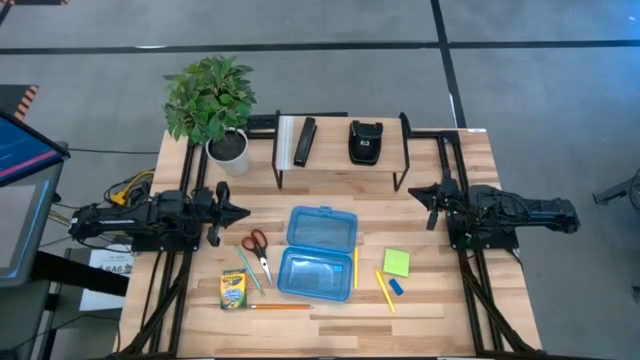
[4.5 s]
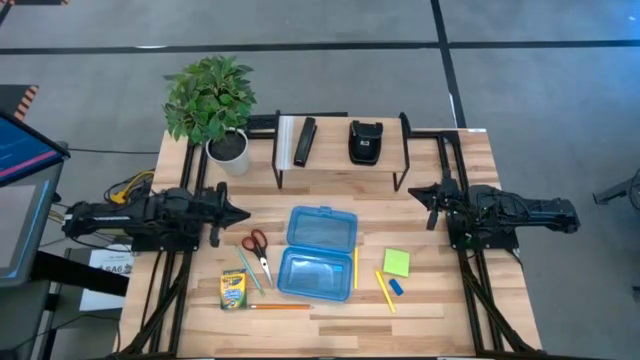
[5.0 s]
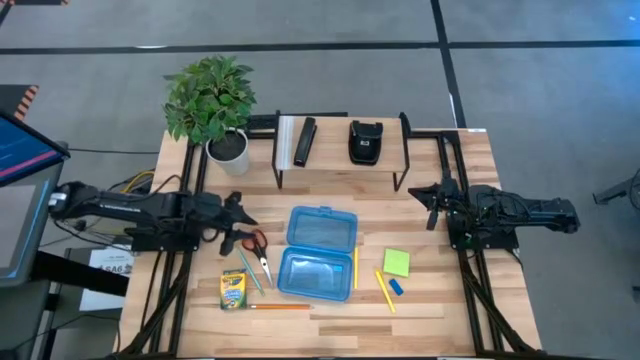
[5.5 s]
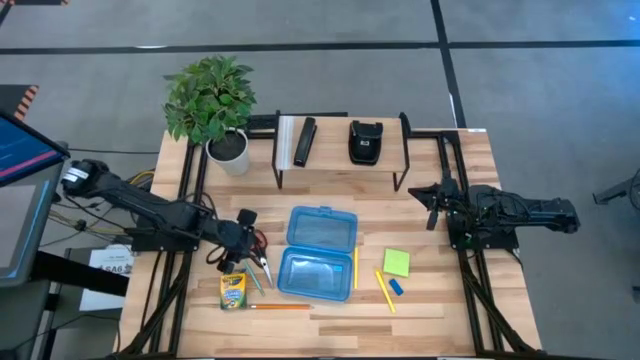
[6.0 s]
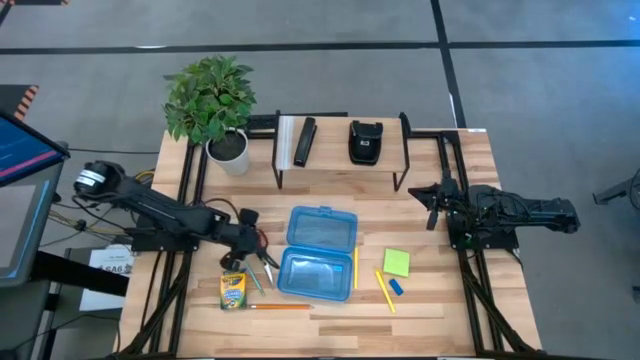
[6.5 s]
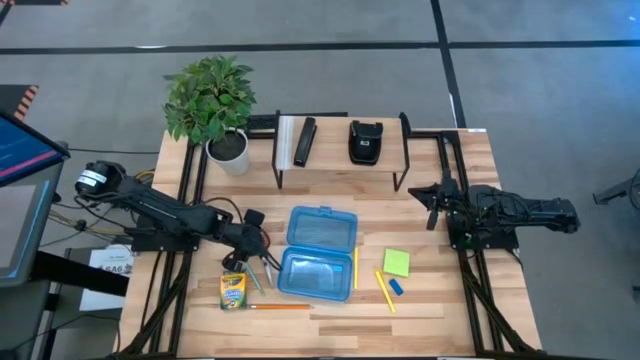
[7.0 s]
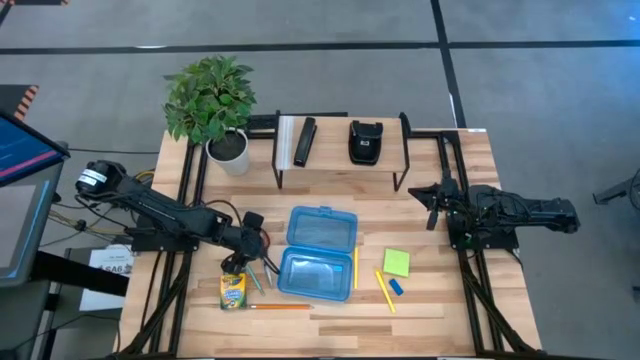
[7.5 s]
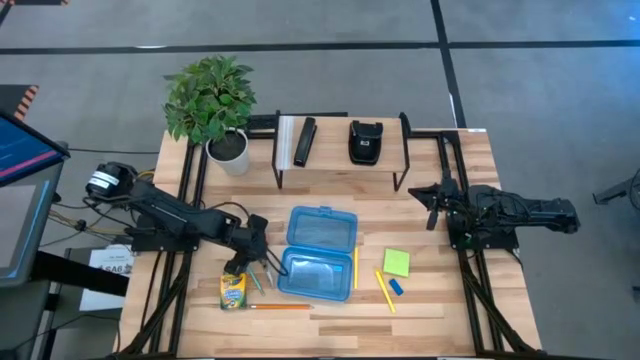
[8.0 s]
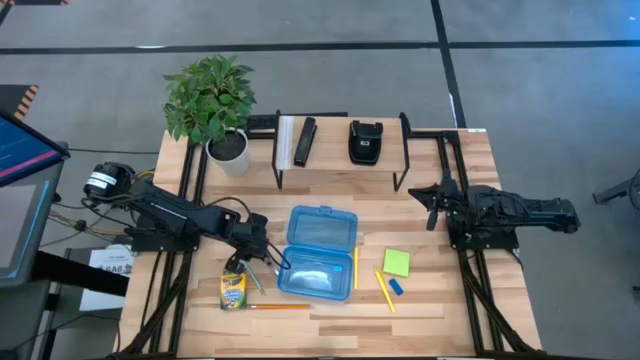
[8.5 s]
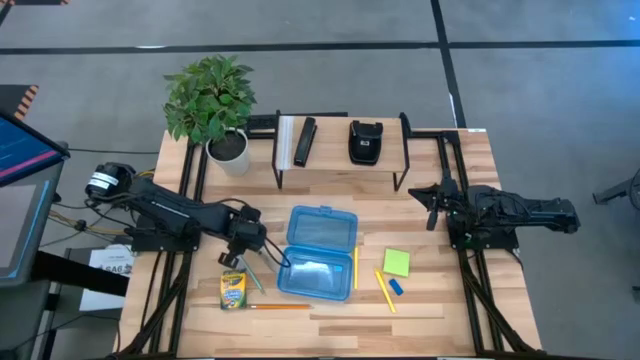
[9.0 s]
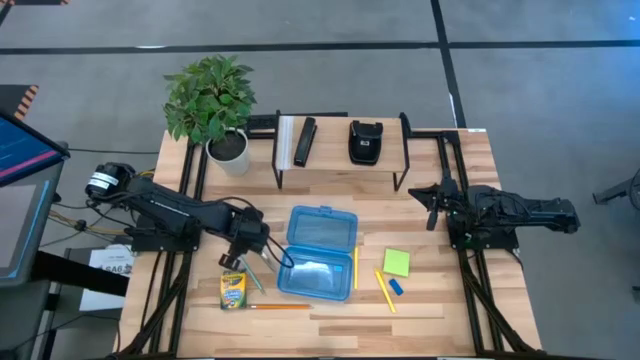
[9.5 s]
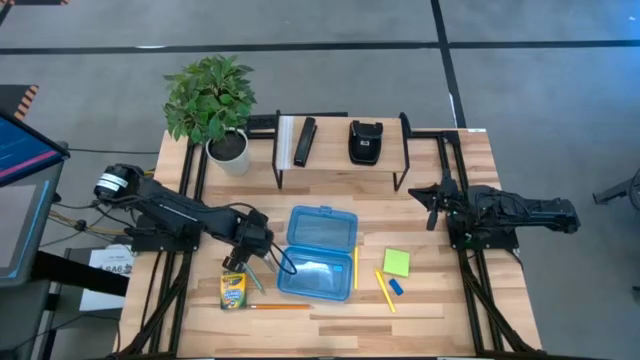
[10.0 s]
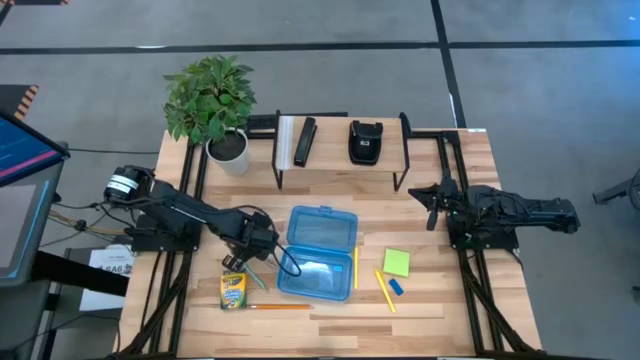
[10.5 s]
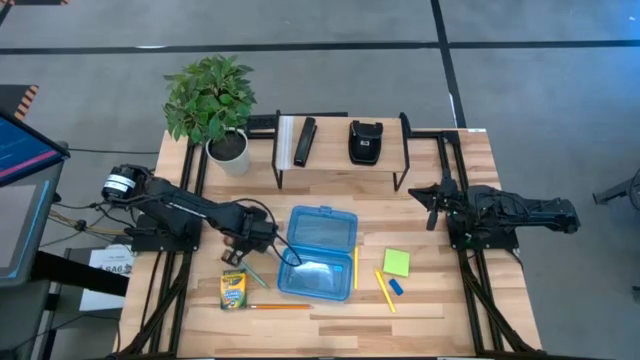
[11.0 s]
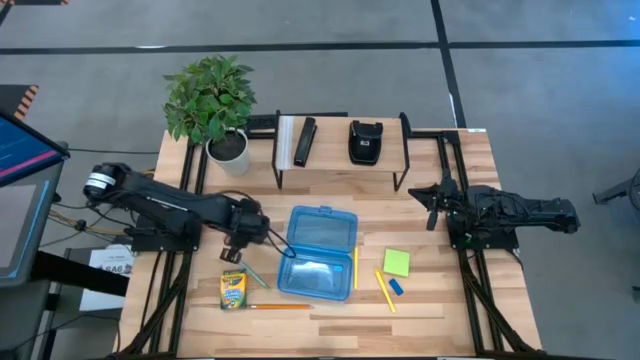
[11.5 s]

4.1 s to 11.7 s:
Task: Pack school essentials
Put the red scissors into the supply box

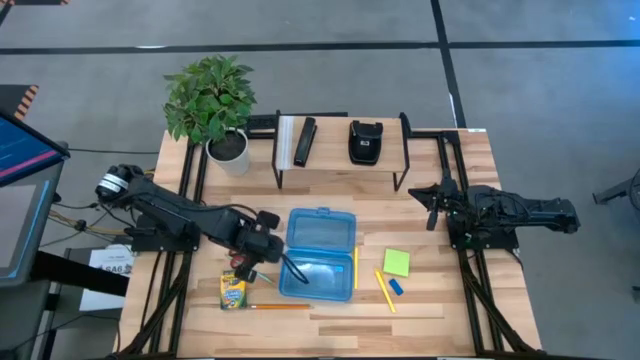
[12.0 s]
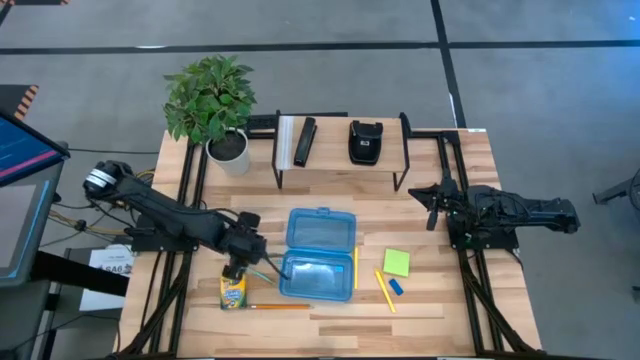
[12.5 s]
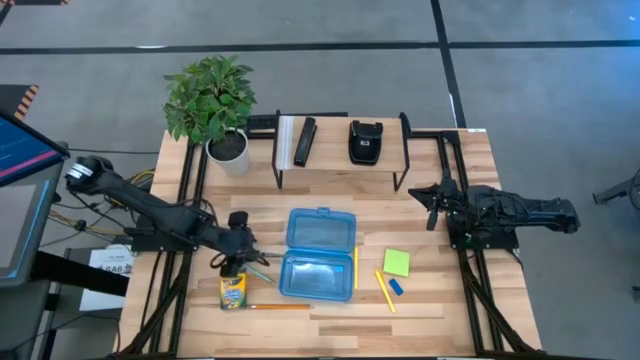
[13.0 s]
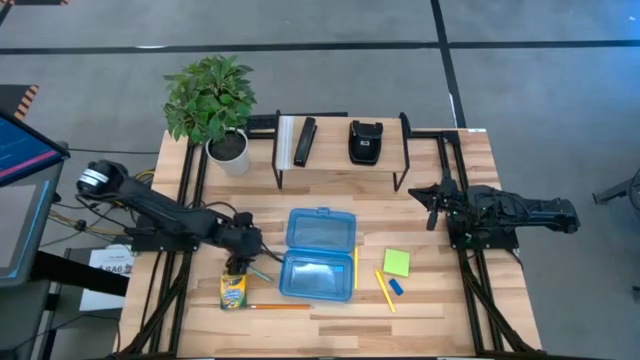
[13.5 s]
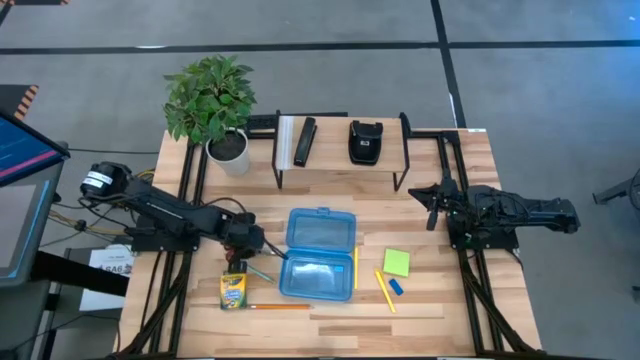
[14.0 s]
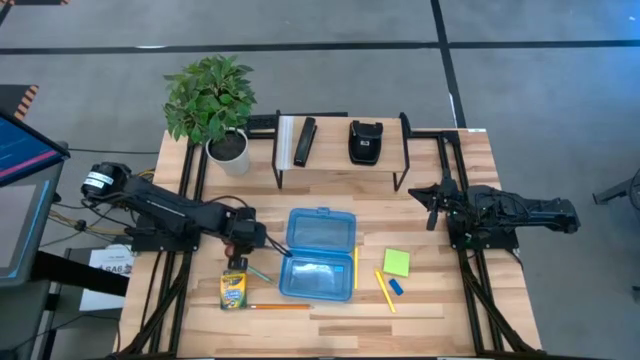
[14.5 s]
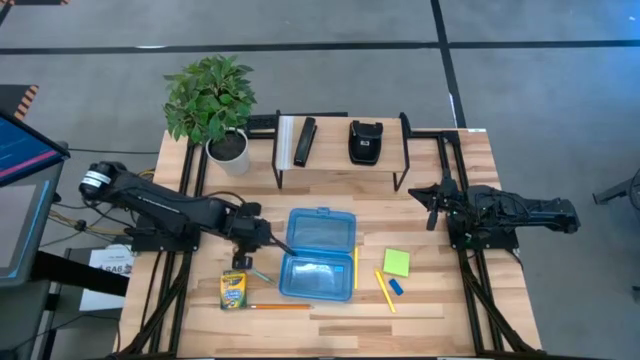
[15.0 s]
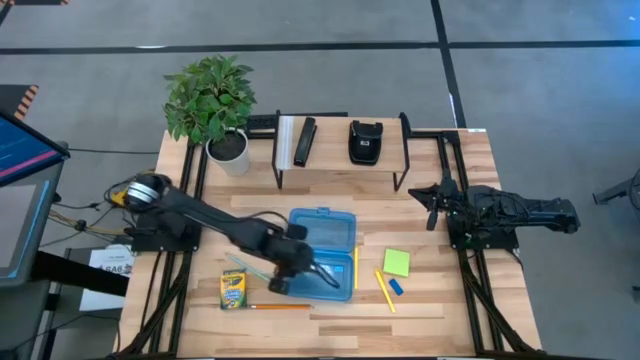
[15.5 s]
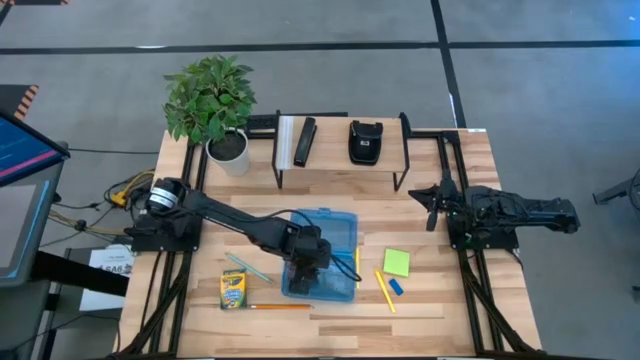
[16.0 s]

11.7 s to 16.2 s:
Put the red scissors into the supply box

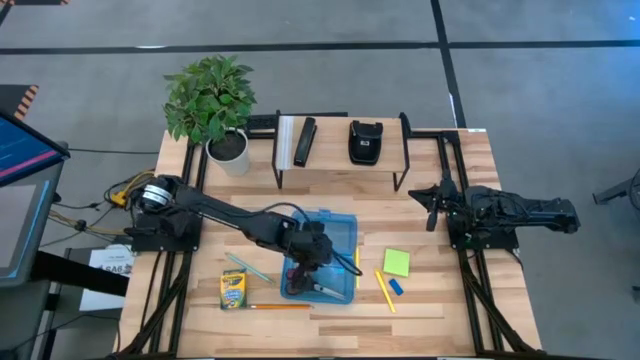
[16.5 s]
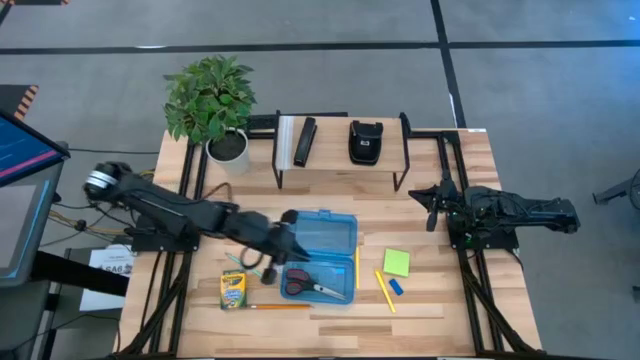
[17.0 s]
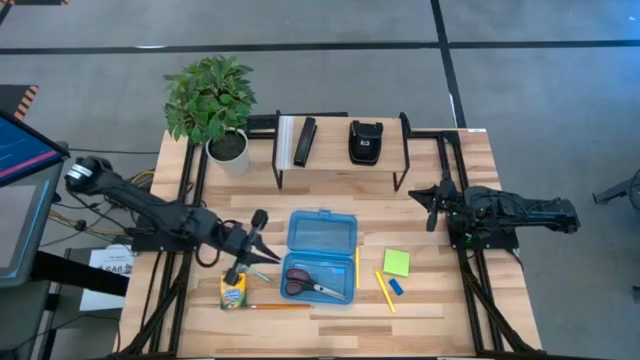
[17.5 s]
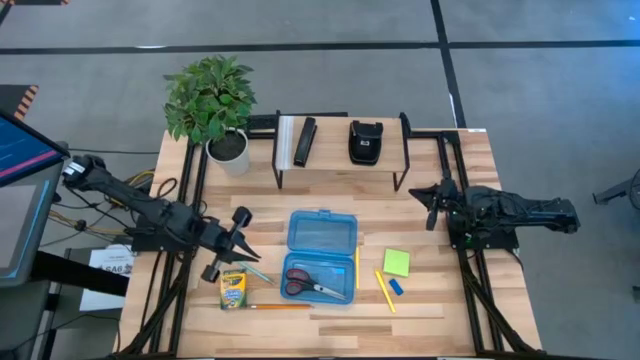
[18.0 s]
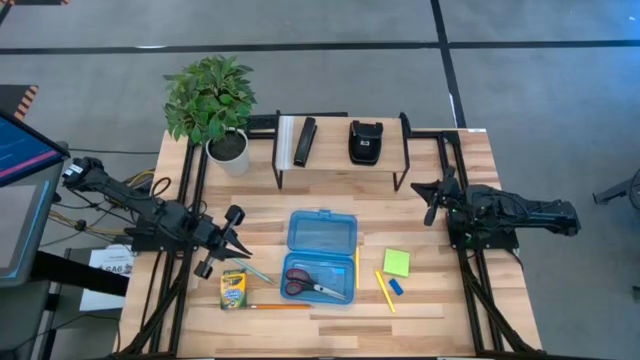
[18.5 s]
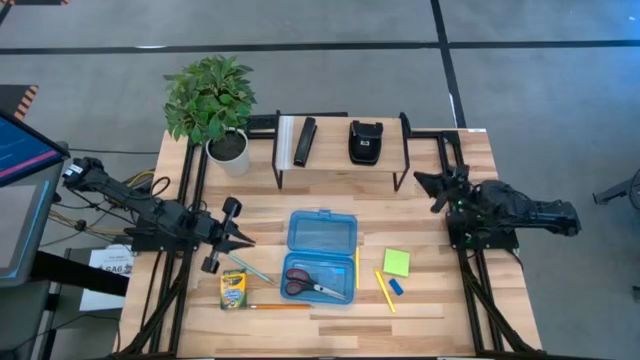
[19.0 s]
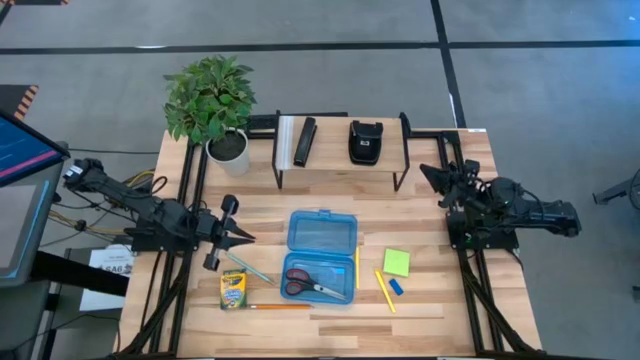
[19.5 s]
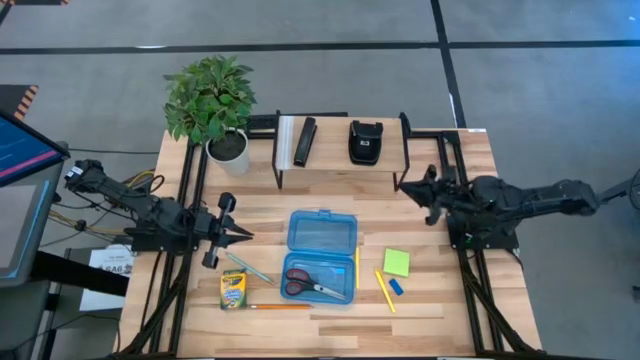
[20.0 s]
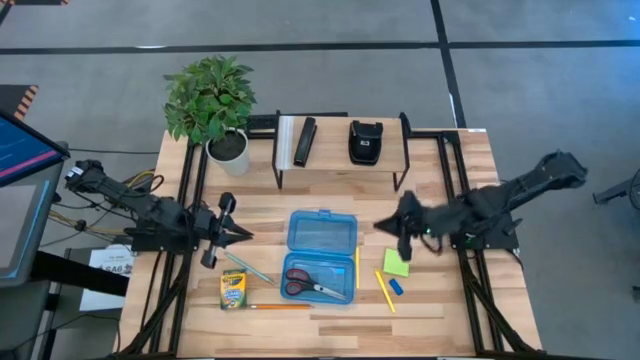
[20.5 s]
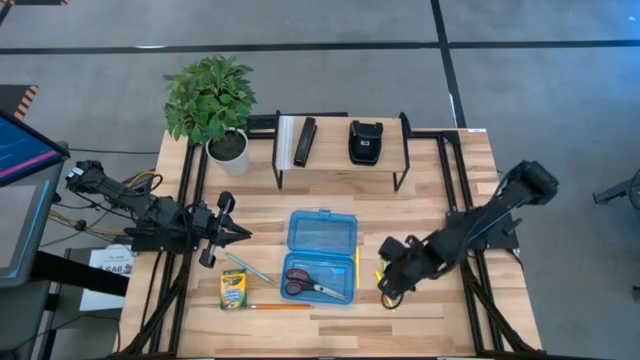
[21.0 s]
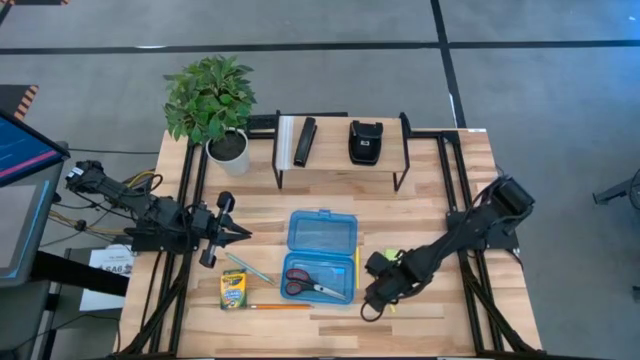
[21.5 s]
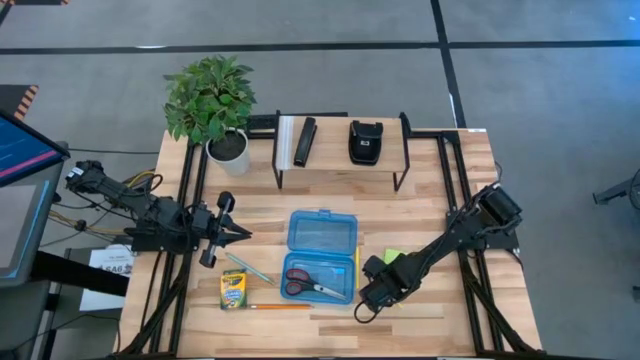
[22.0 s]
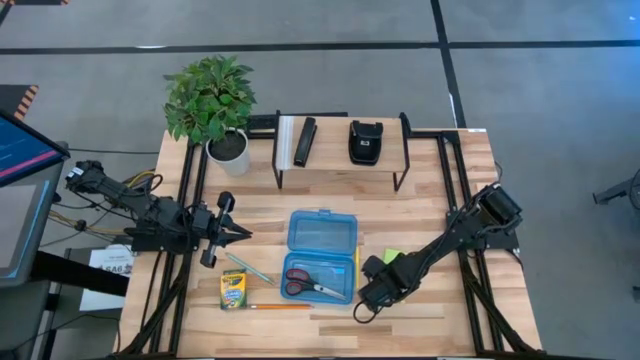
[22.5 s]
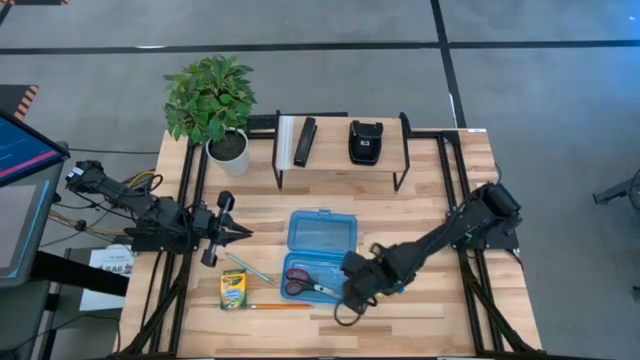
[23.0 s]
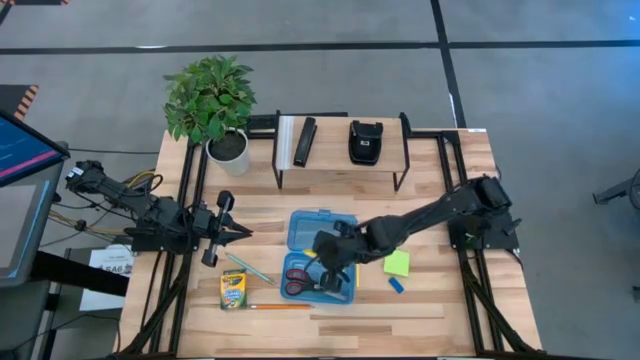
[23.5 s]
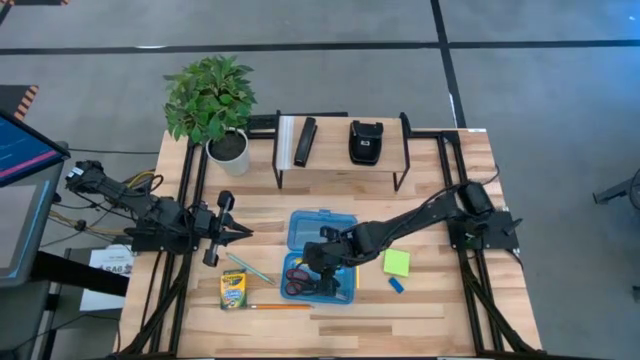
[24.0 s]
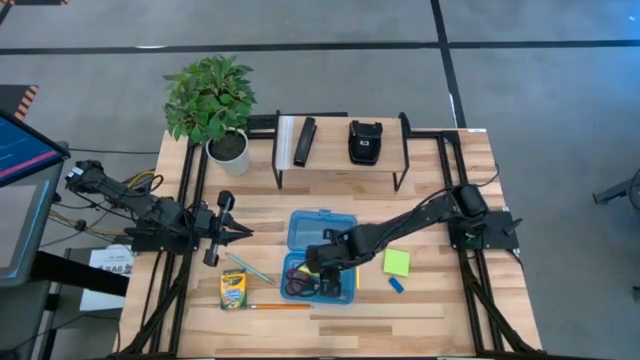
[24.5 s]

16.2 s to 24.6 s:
Put the right yellow pen into the supply box

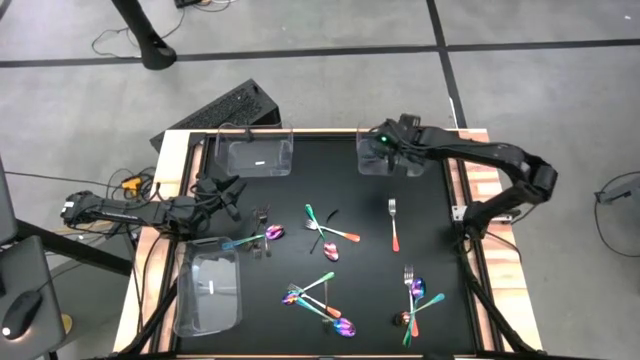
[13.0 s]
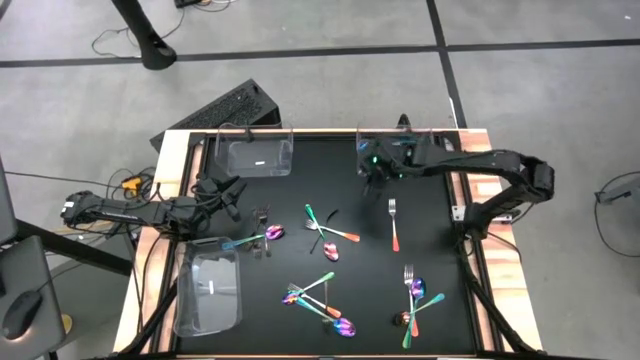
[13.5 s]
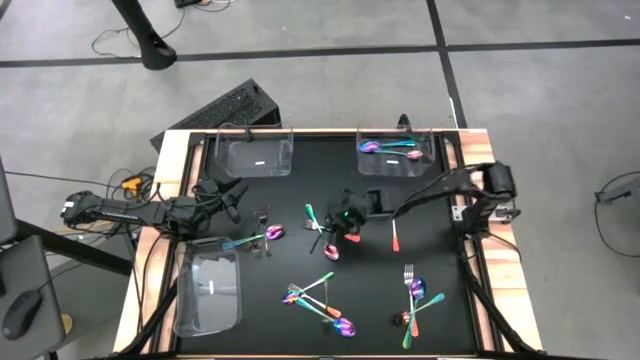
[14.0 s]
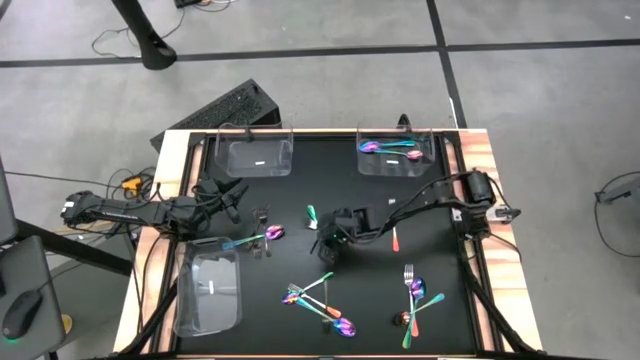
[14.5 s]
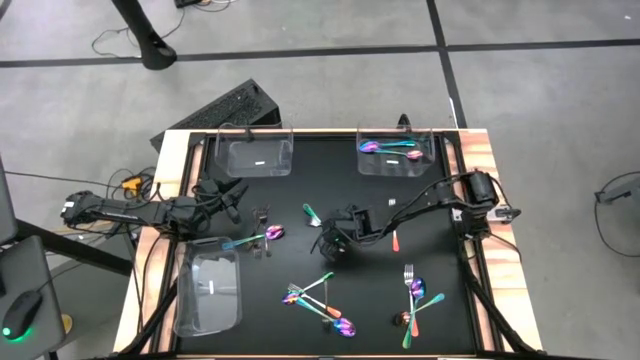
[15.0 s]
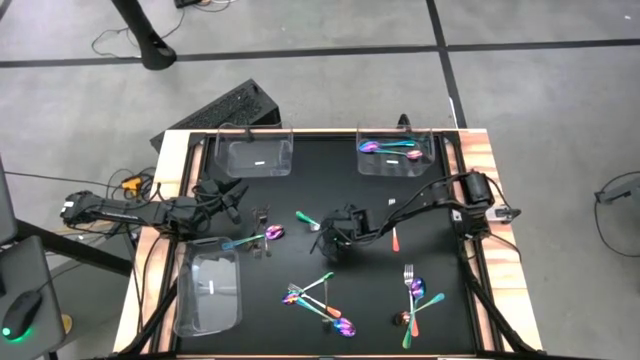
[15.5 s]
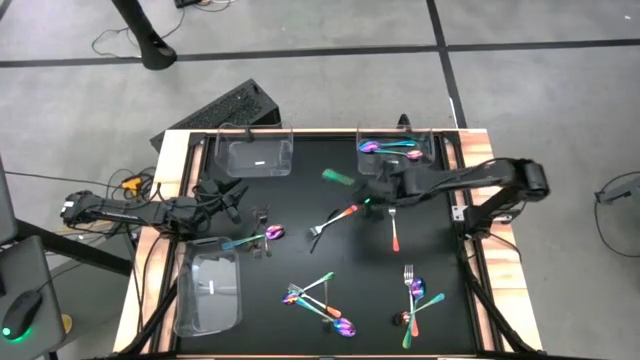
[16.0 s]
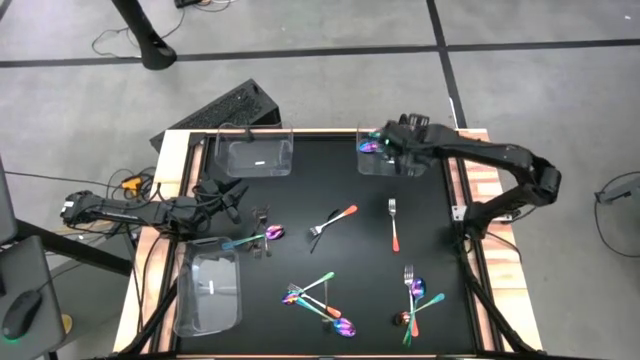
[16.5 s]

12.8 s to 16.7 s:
Task: Sort silverware by color (type)
Put the blue spoon into top right transparent bin
